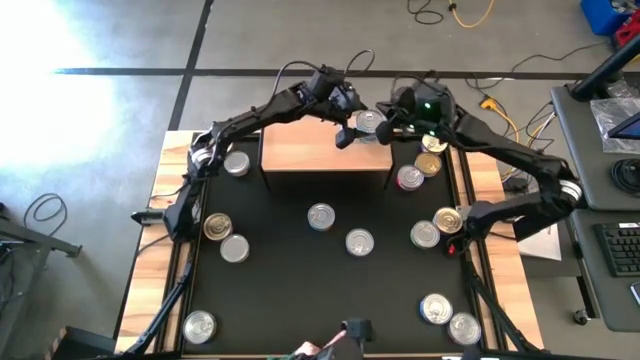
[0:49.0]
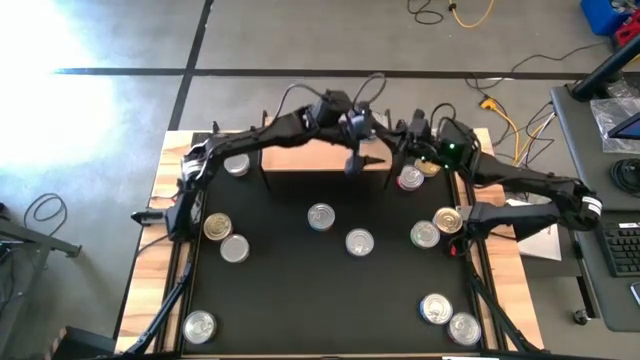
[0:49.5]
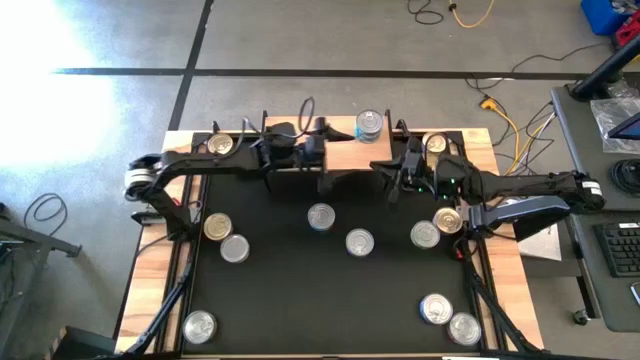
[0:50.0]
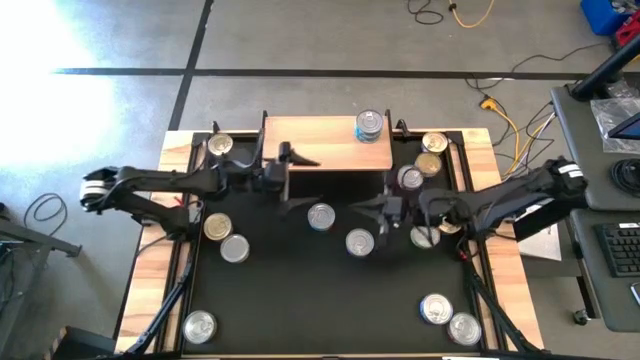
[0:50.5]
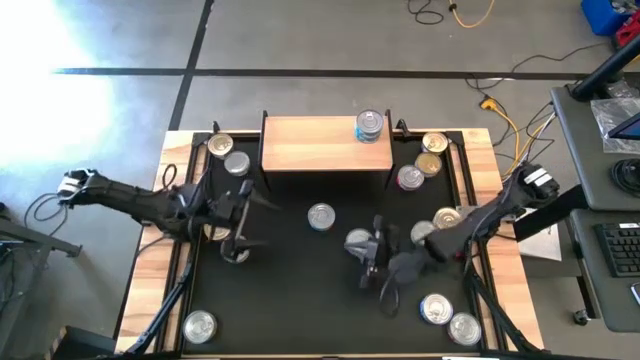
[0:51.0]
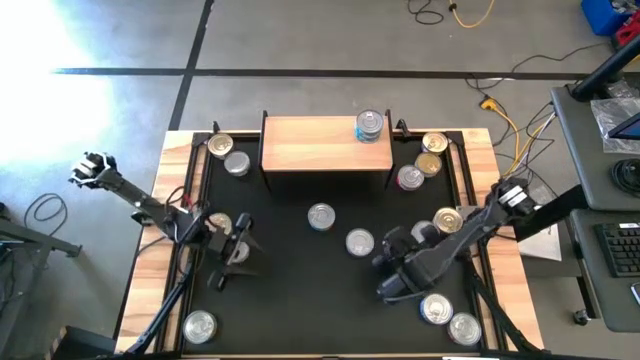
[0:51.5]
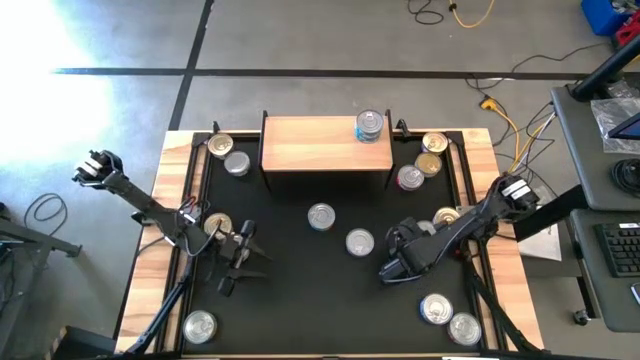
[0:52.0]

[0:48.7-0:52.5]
Task: Stack canned seafood by type on shelf
Put the bottom green tuna can on the shelf

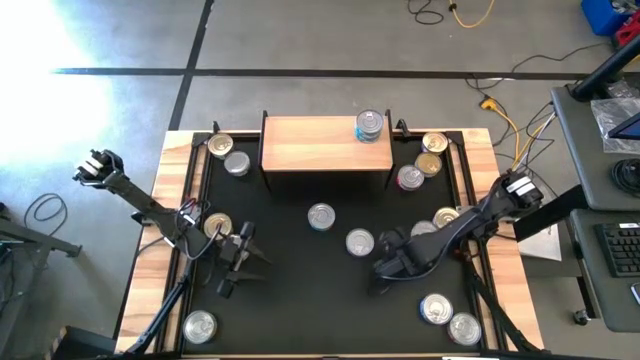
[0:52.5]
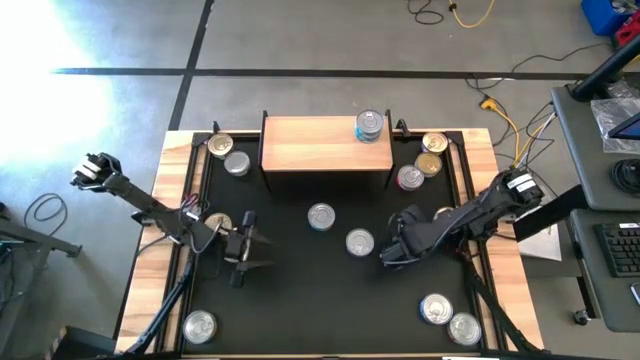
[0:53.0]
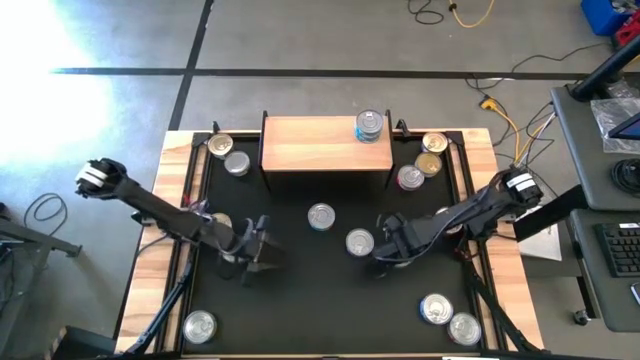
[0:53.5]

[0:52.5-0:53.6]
Put the bottom green tuna can on the shelf

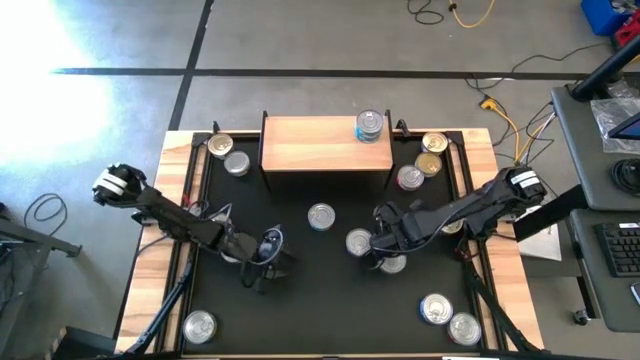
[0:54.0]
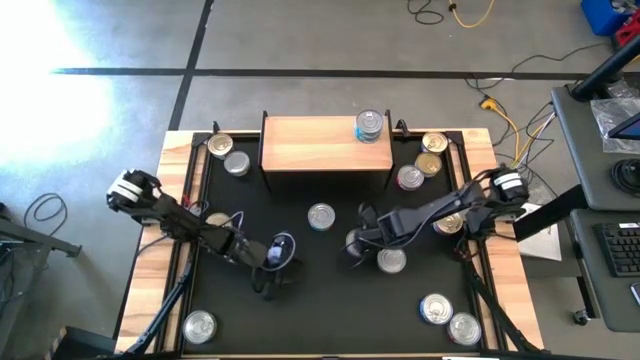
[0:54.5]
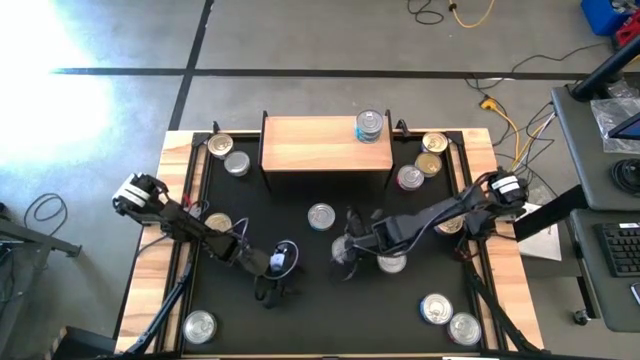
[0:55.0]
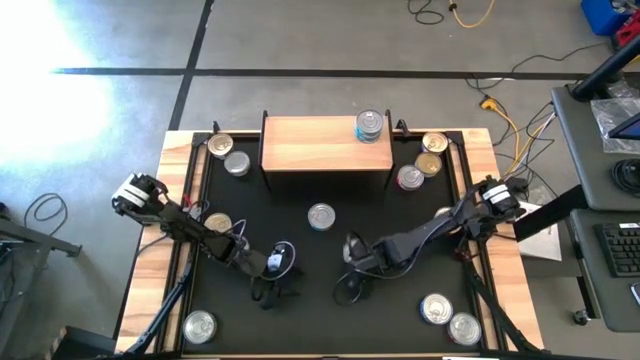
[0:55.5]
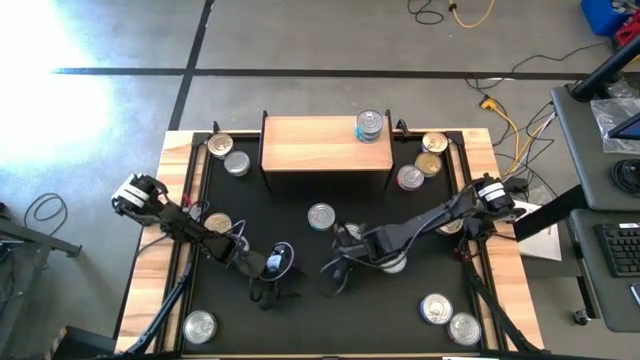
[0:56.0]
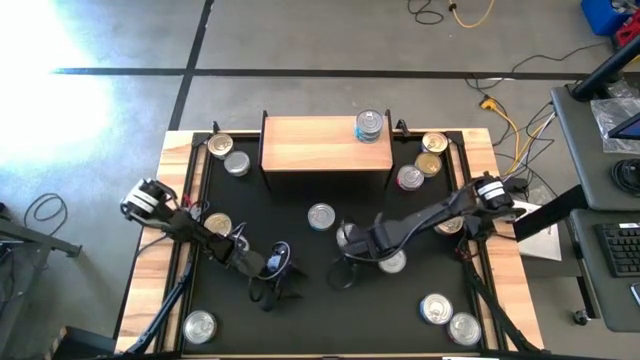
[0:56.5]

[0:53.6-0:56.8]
Move the top dark blue tuna can to the center

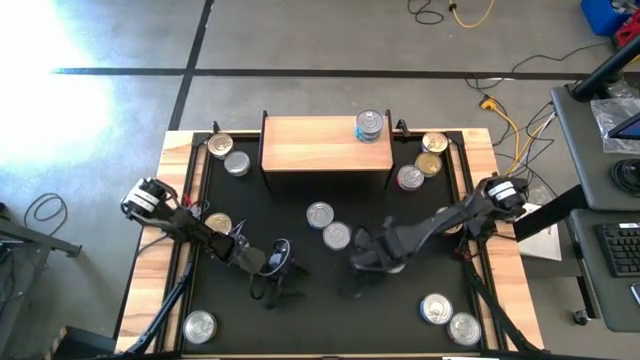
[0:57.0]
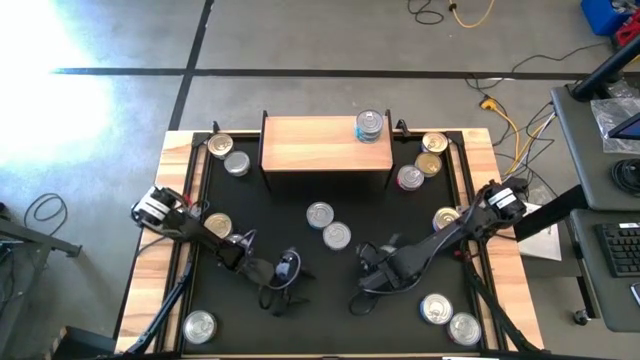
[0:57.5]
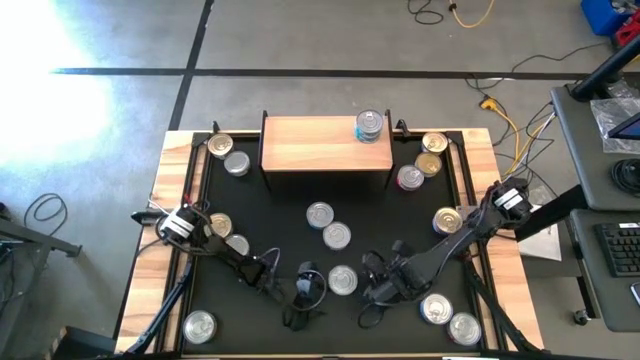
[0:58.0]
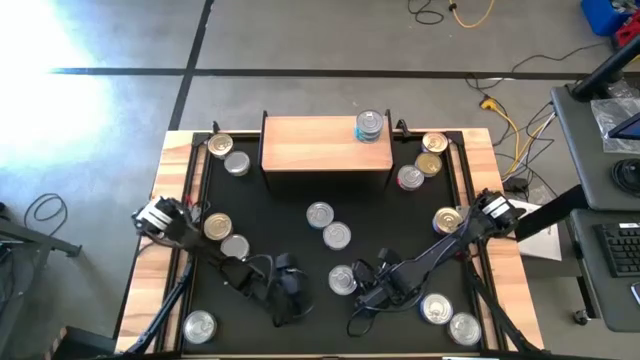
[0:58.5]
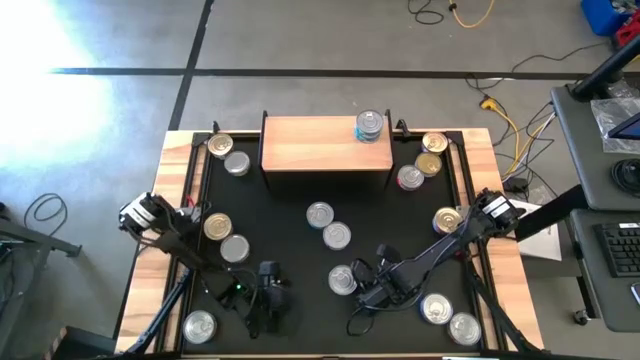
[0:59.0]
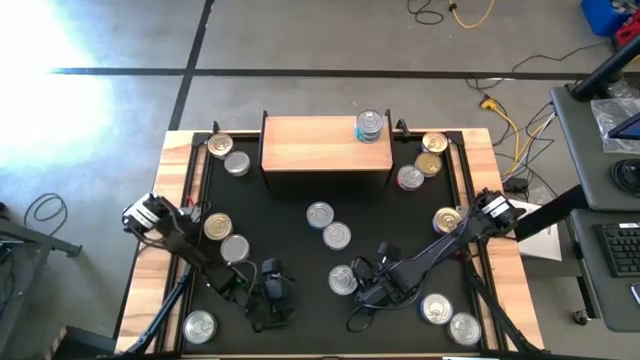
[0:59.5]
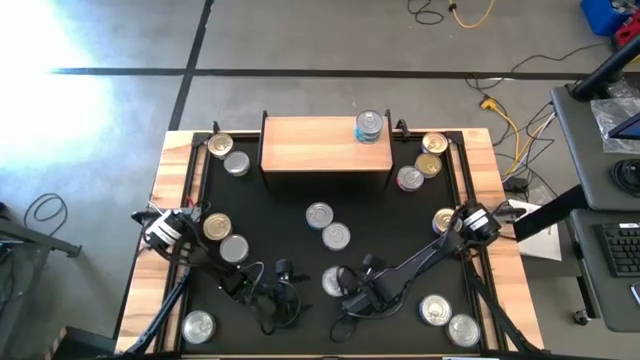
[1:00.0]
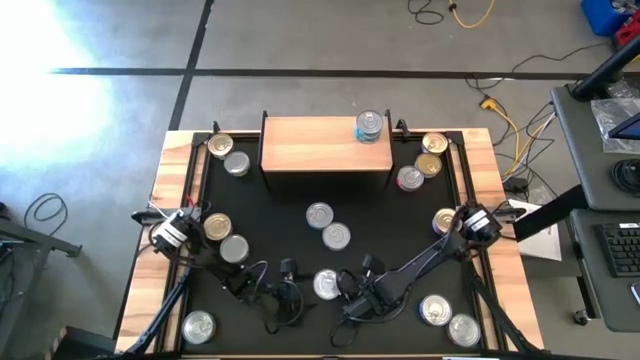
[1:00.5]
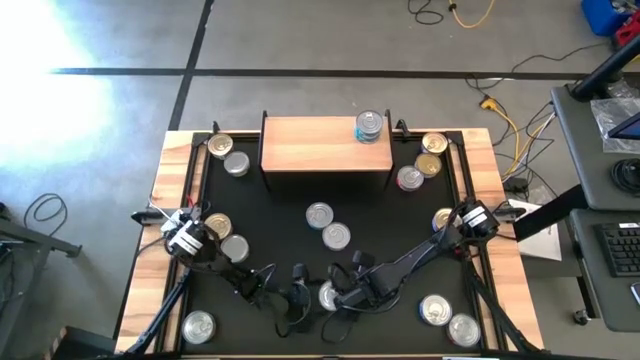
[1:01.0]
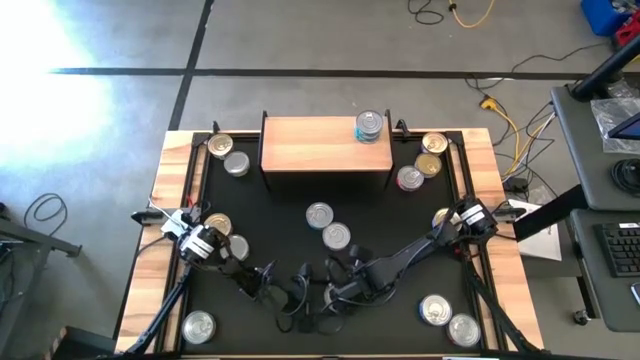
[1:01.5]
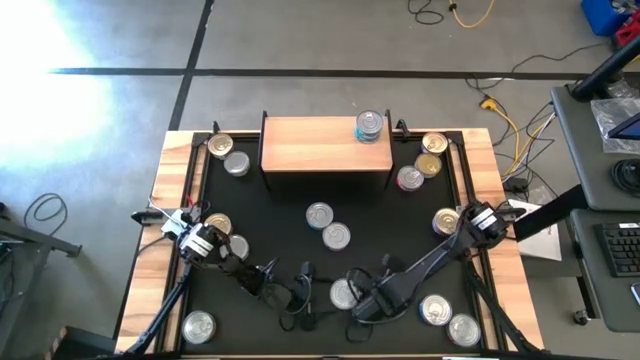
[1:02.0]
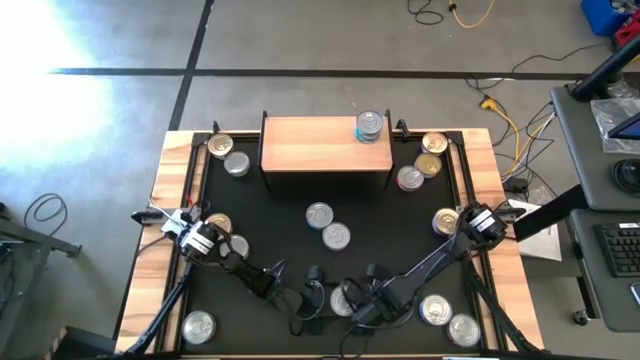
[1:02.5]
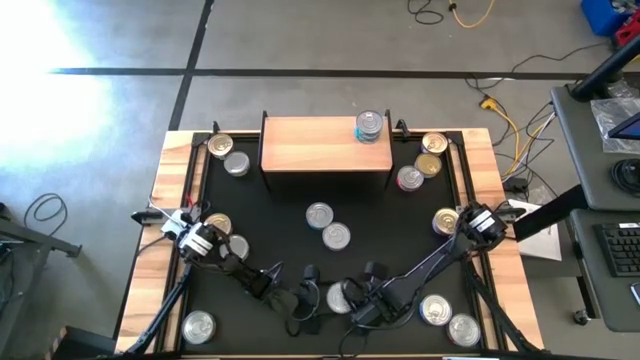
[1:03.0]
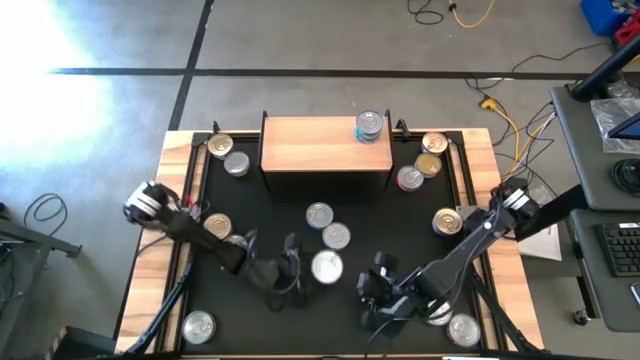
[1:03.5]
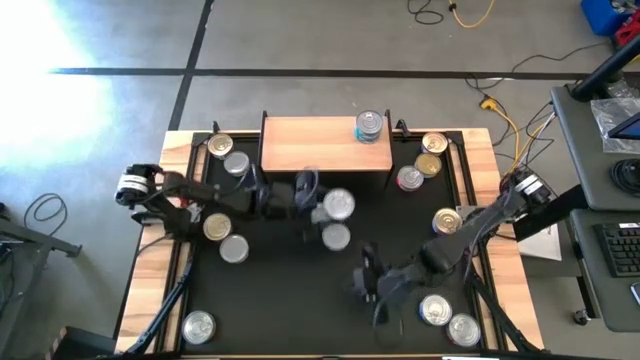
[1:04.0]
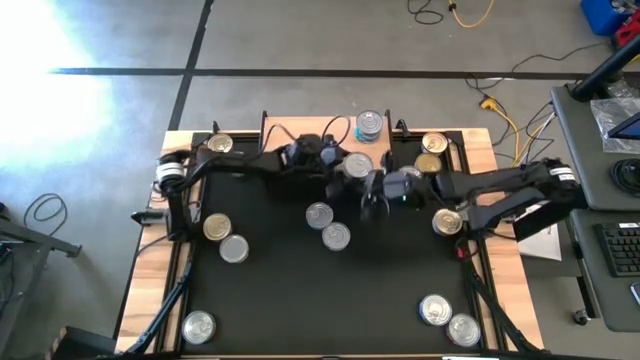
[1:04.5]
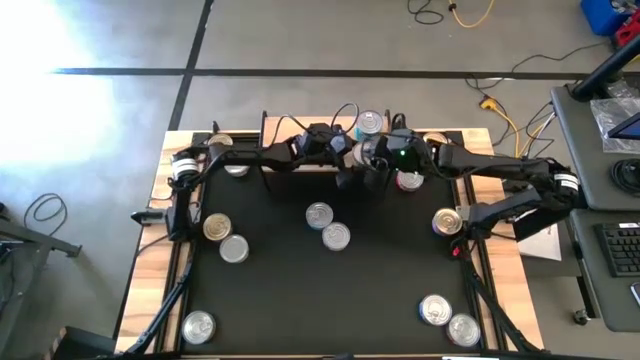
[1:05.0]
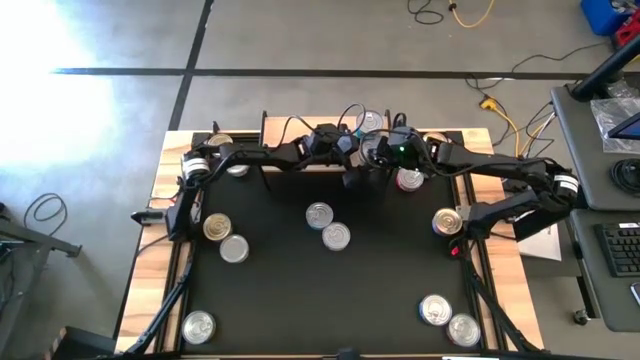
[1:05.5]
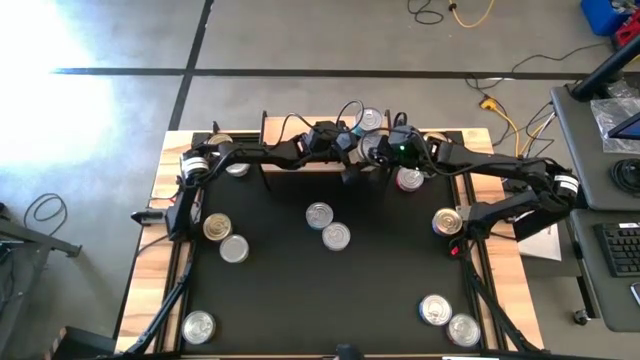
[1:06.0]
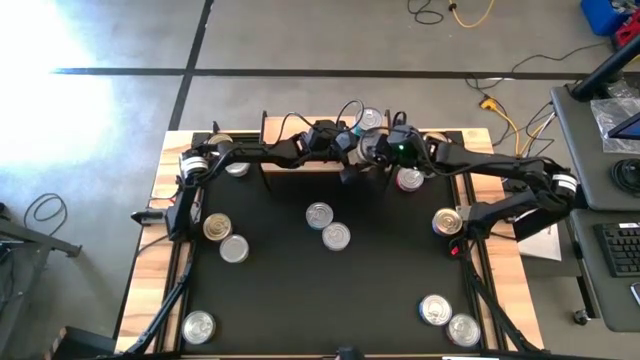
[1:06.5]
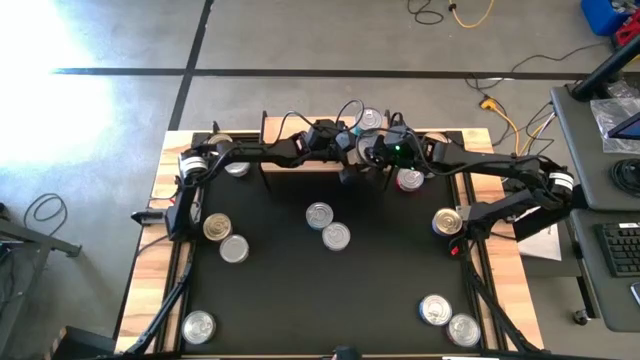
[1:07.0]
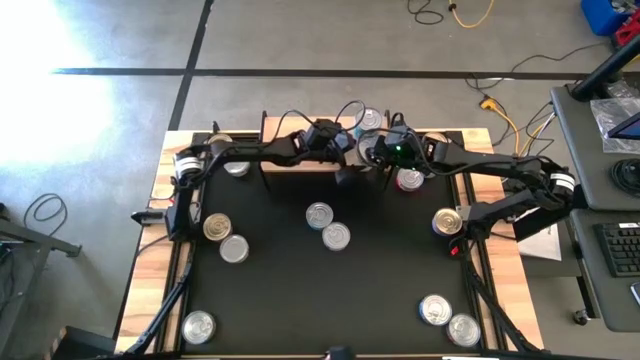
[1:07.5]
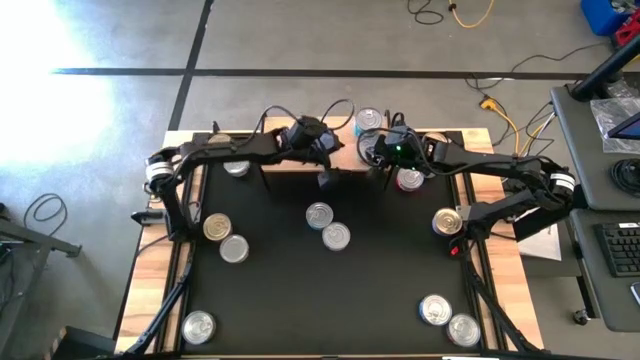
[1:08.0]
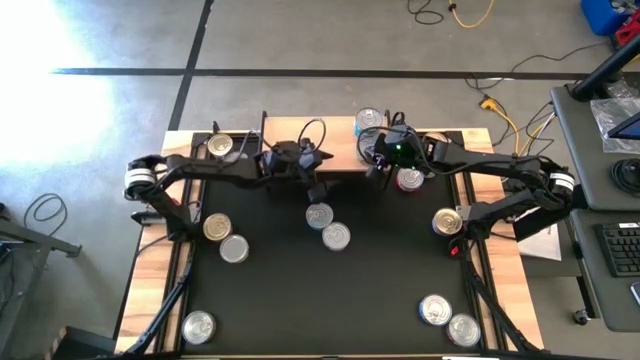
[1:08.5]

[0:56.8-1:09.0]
Put the bottom green tuna can on the shelf
